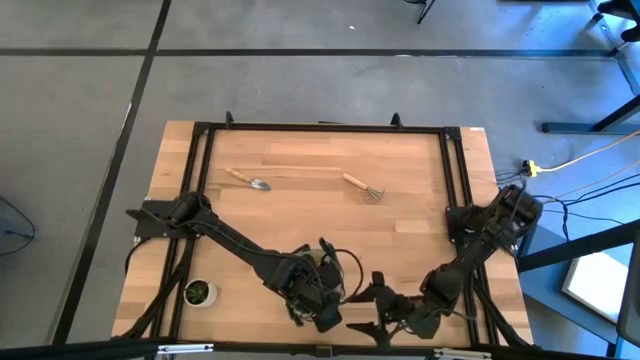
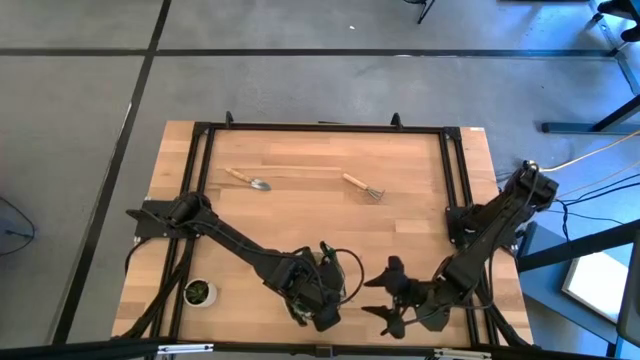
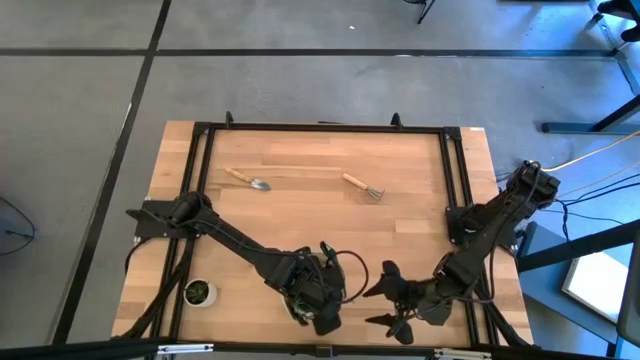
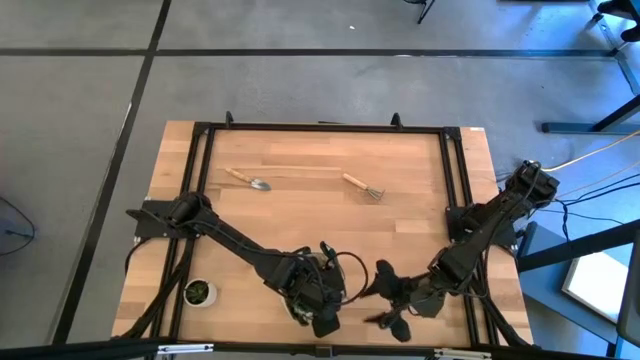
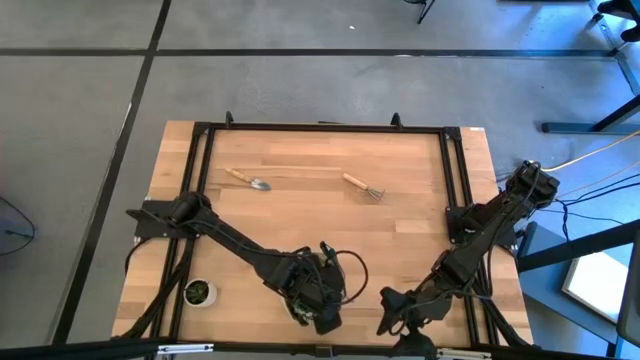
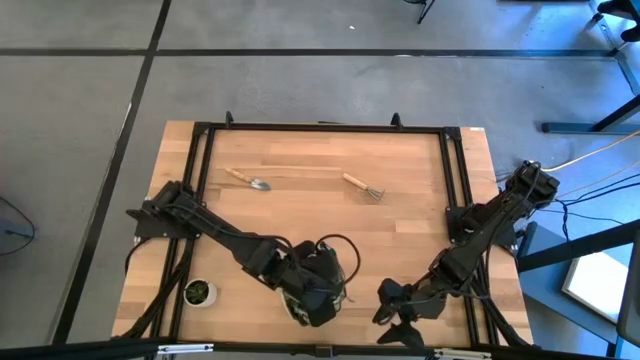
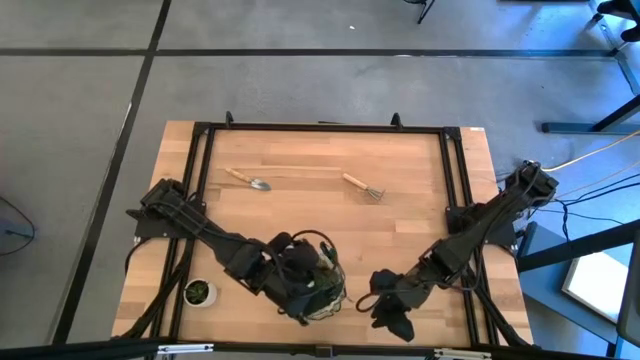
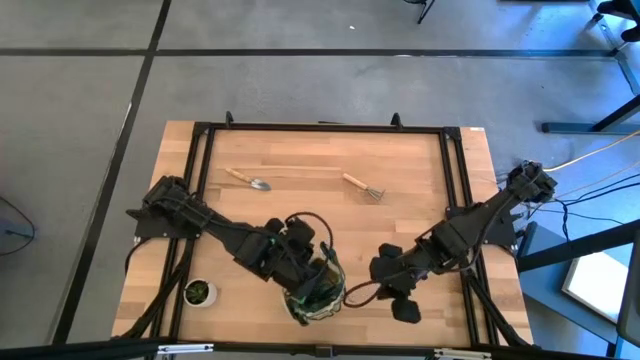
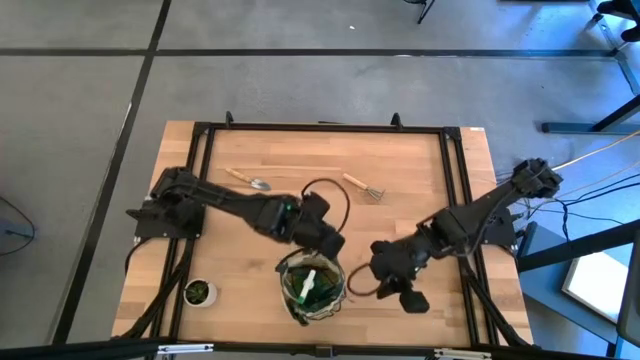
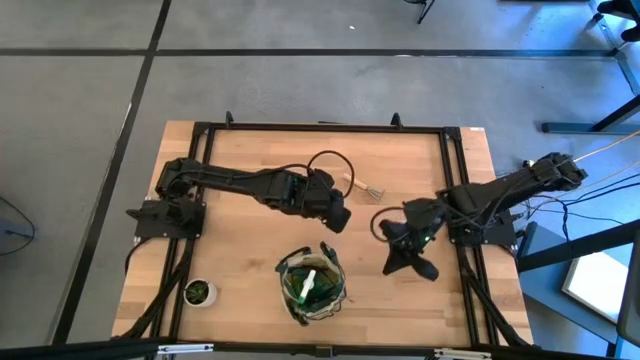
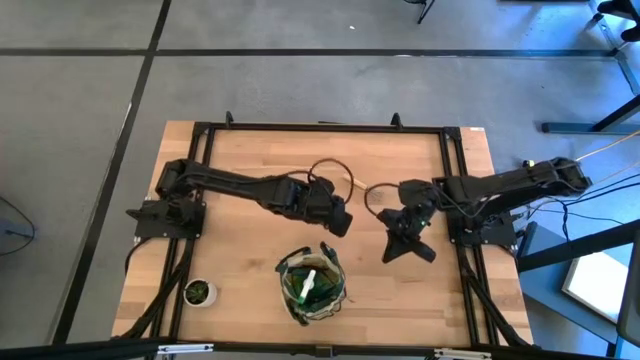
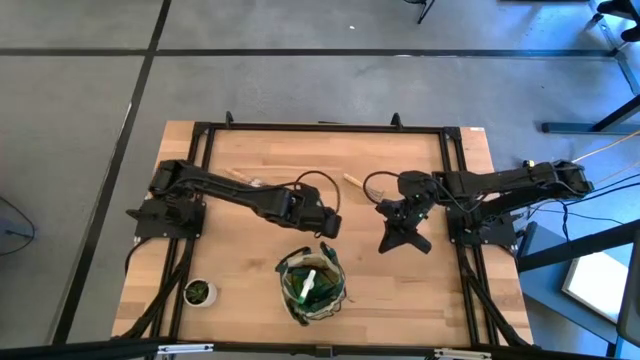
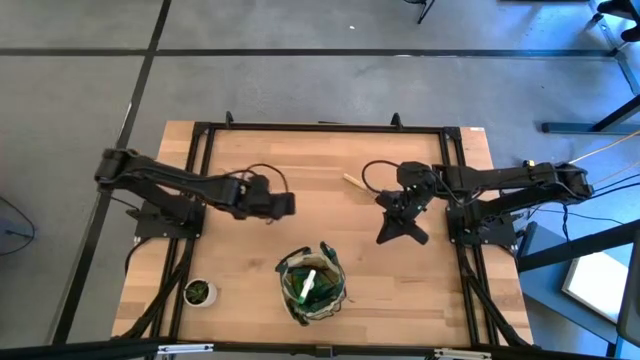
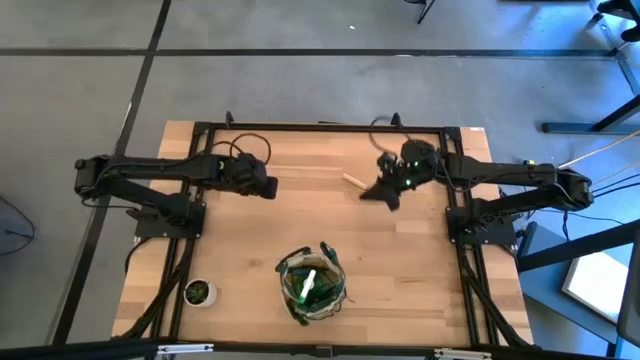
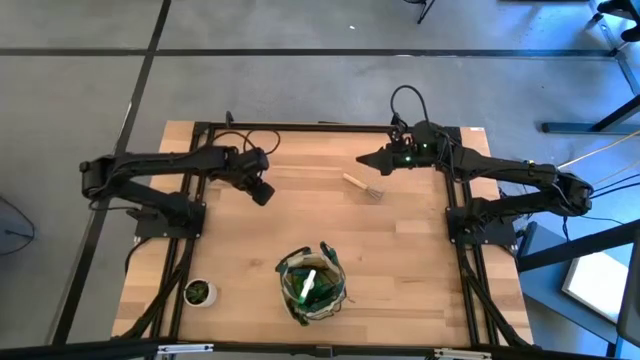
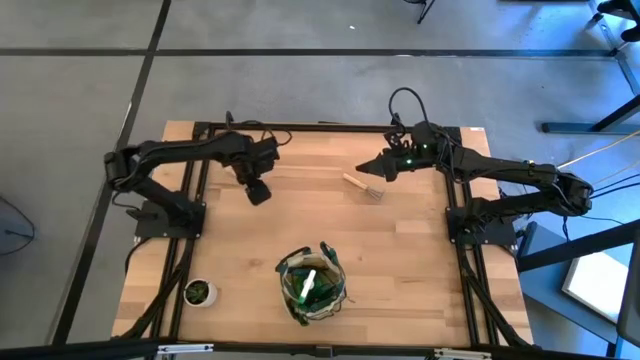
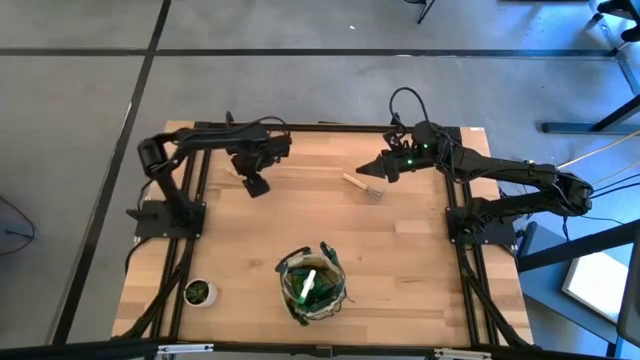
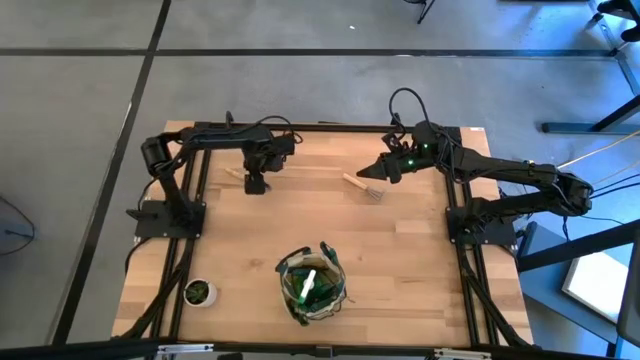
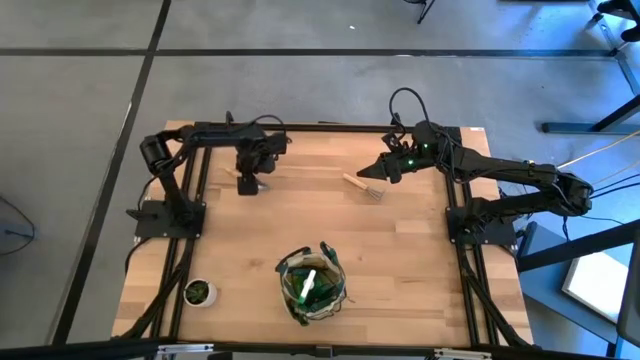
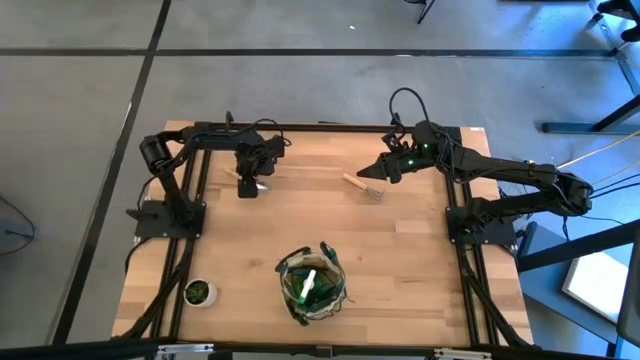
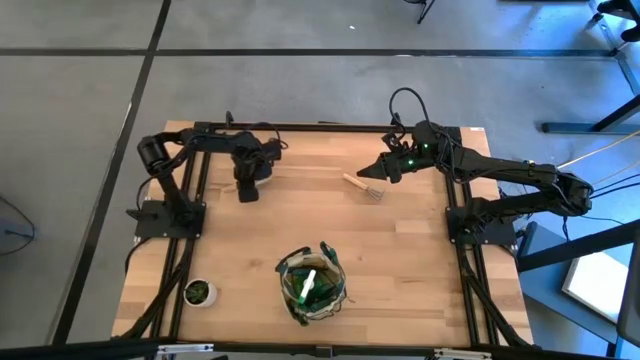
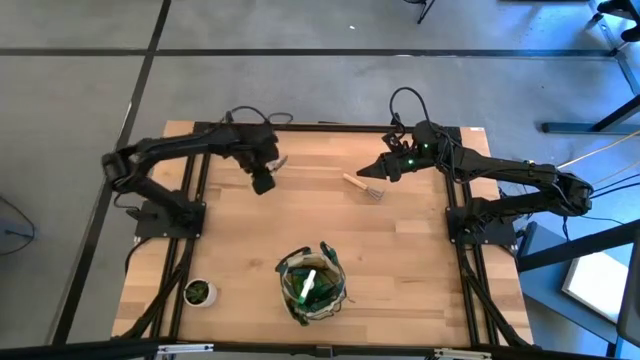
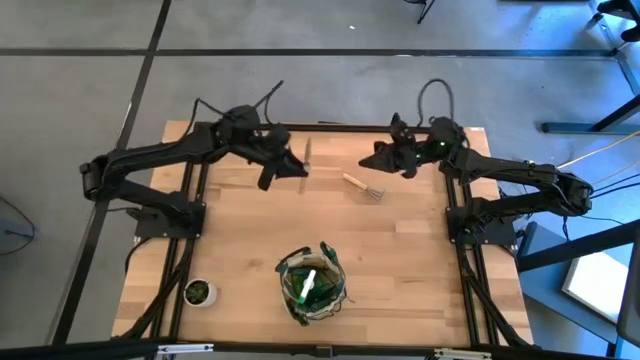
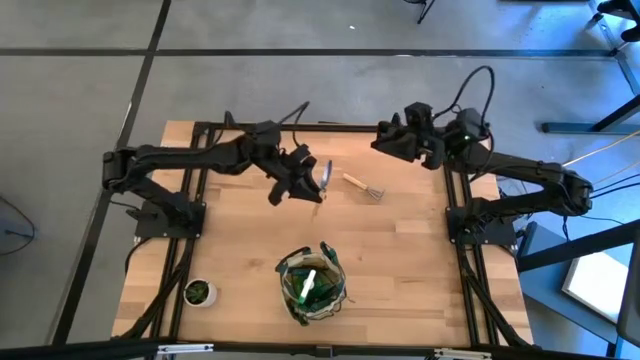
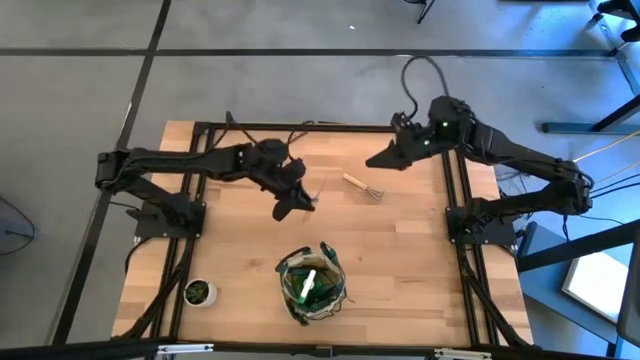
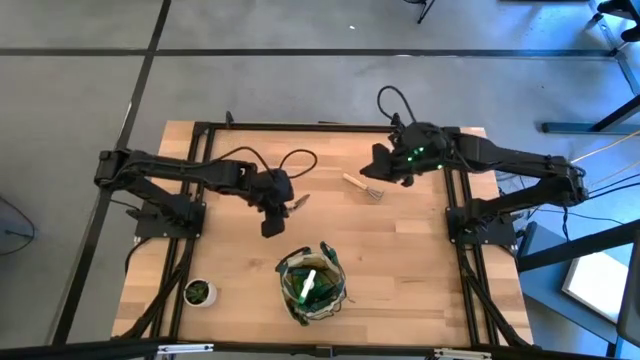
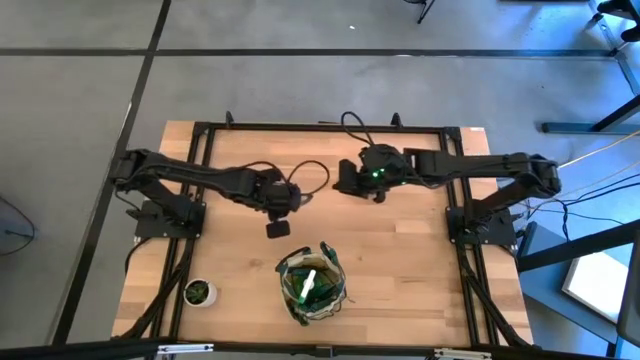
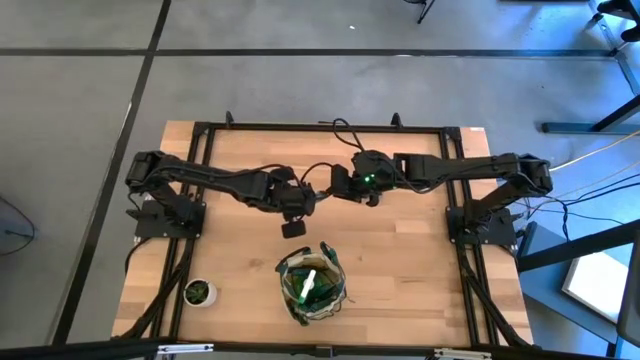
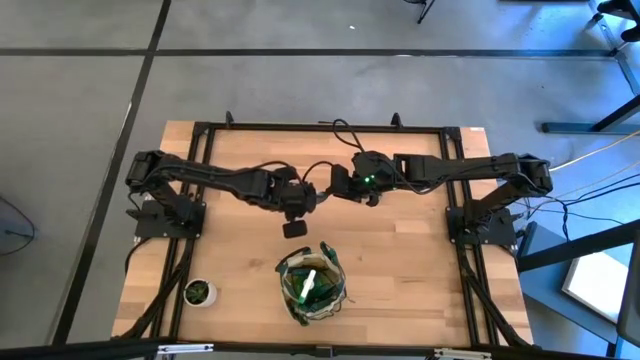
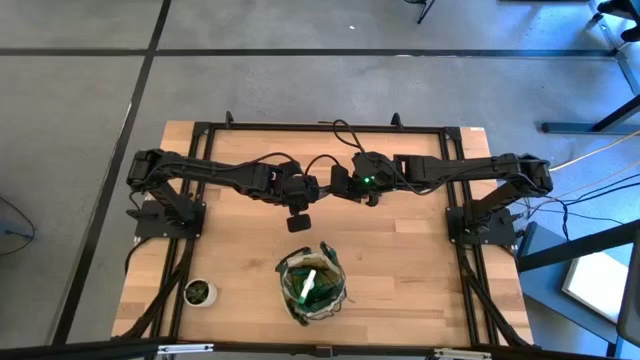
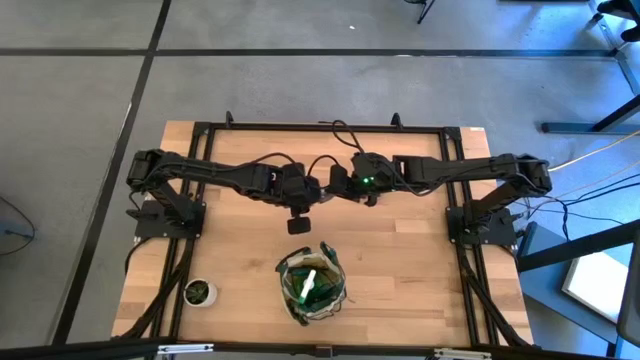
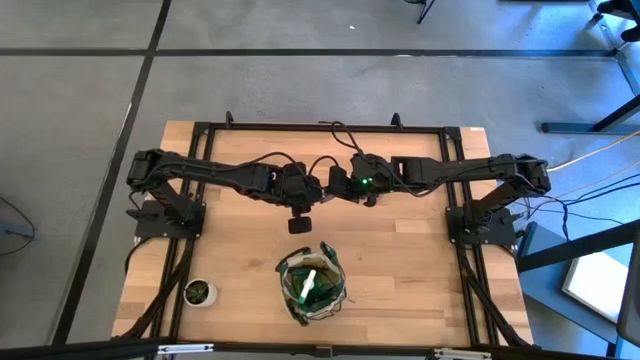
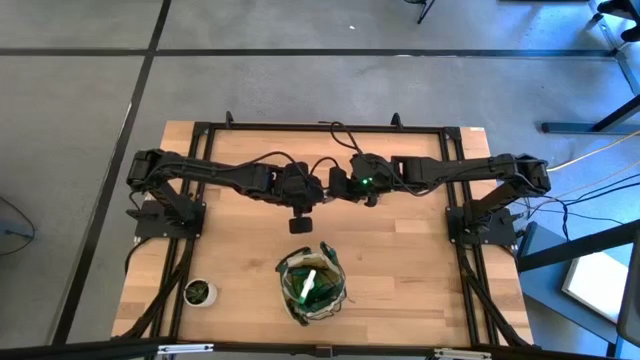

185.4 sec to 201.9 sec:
Task: Pick & Place Garden tools in Gardening bag
Put the brown trowel into the gardening bag
